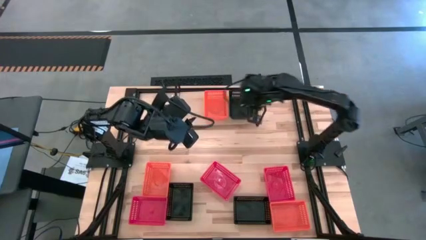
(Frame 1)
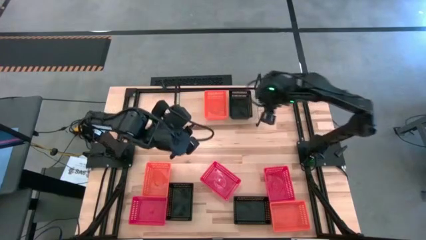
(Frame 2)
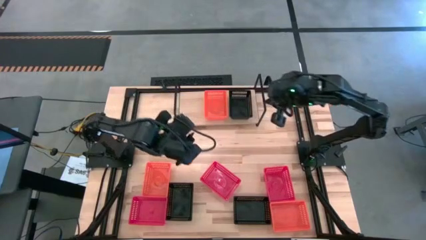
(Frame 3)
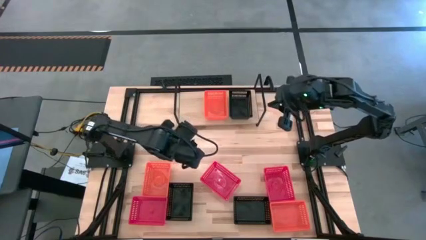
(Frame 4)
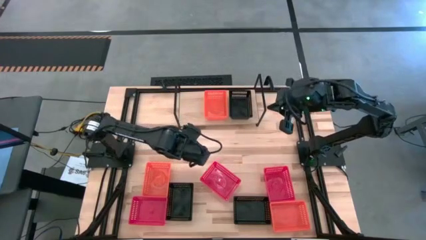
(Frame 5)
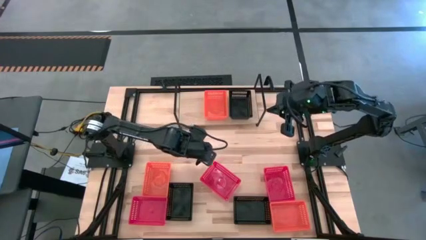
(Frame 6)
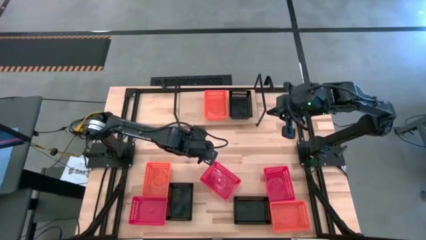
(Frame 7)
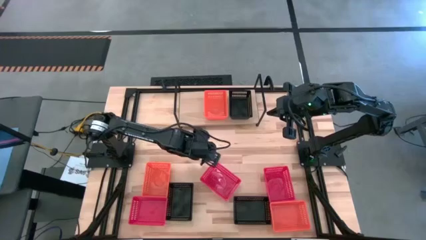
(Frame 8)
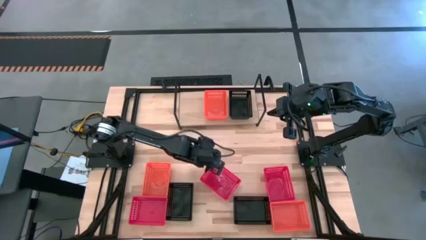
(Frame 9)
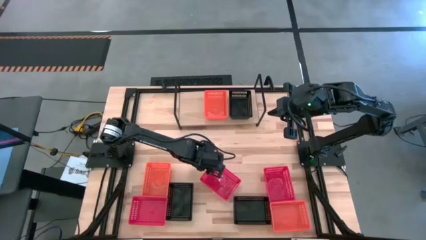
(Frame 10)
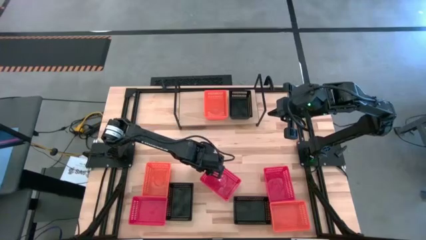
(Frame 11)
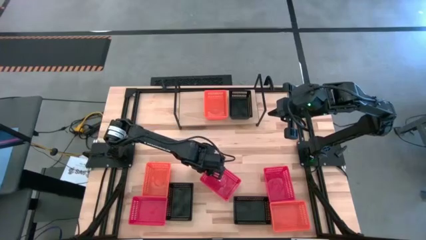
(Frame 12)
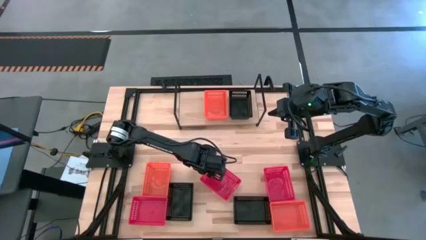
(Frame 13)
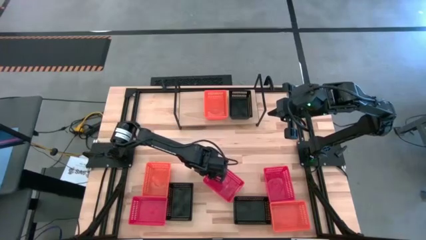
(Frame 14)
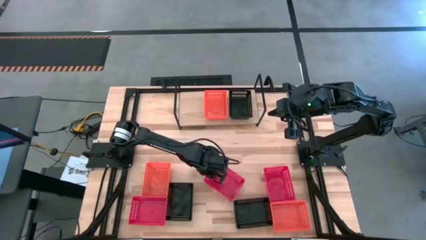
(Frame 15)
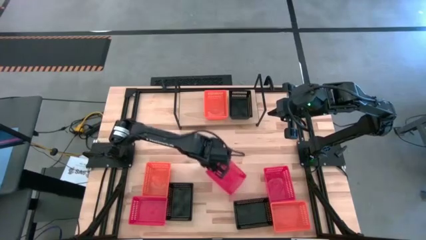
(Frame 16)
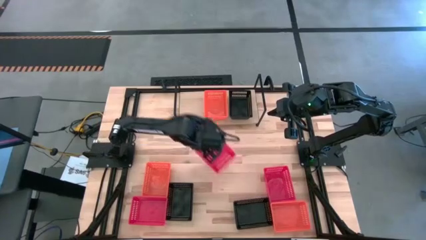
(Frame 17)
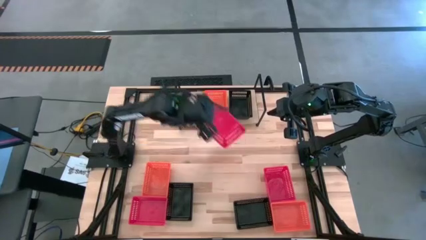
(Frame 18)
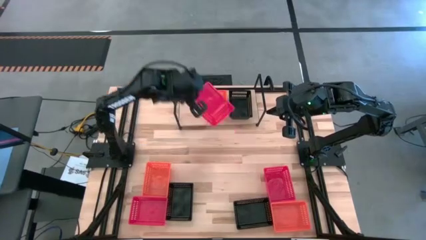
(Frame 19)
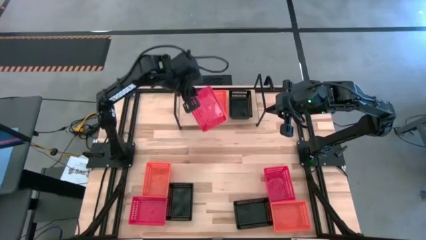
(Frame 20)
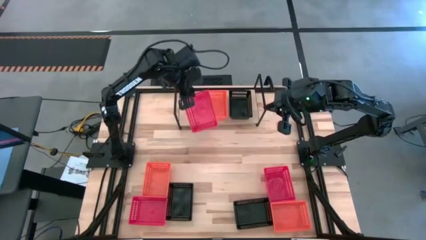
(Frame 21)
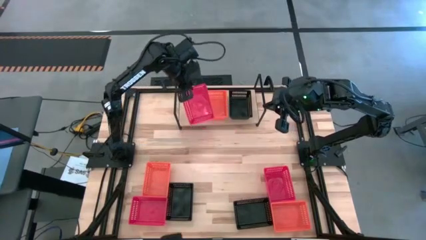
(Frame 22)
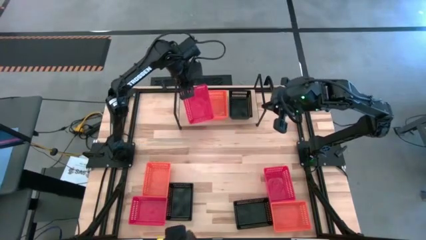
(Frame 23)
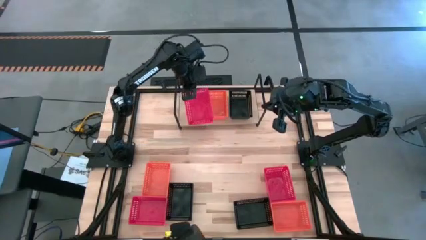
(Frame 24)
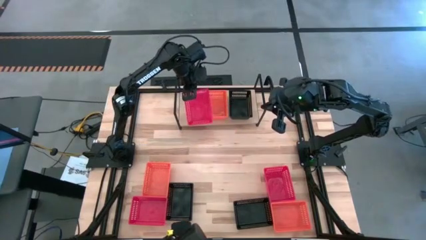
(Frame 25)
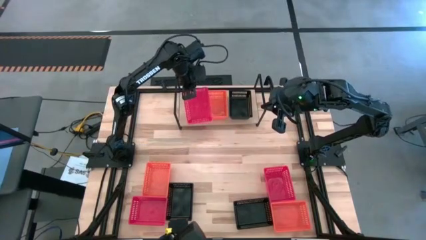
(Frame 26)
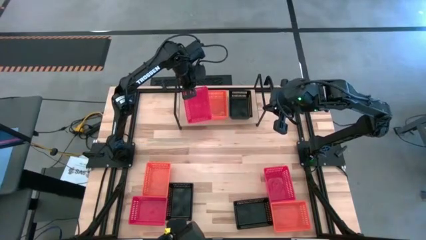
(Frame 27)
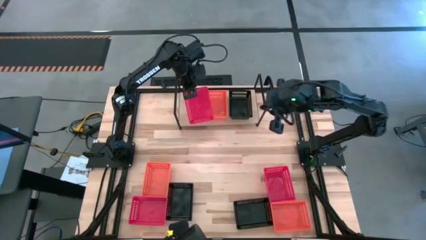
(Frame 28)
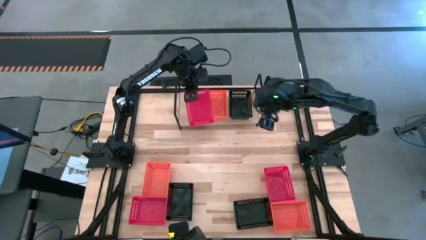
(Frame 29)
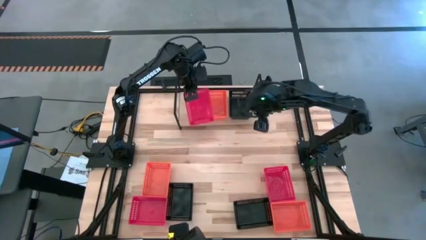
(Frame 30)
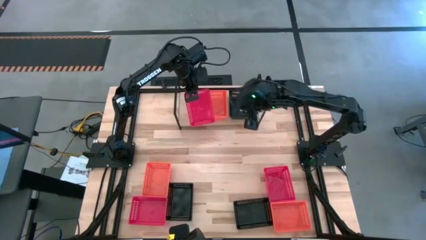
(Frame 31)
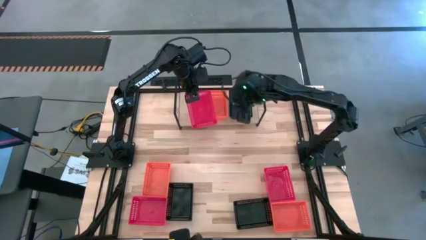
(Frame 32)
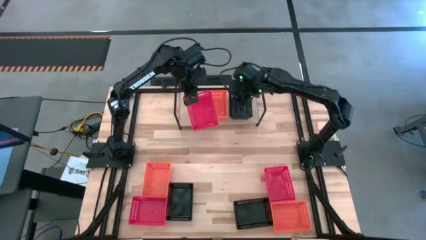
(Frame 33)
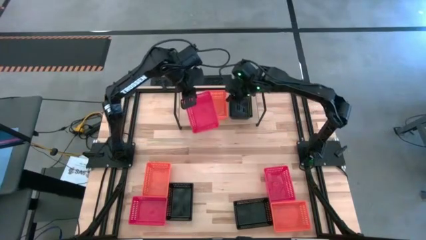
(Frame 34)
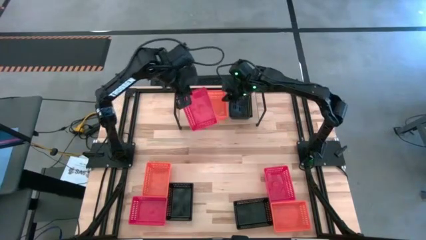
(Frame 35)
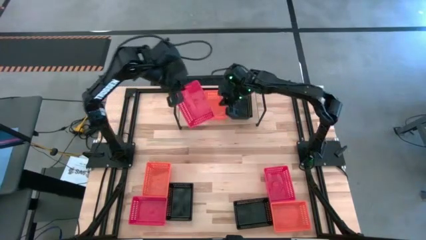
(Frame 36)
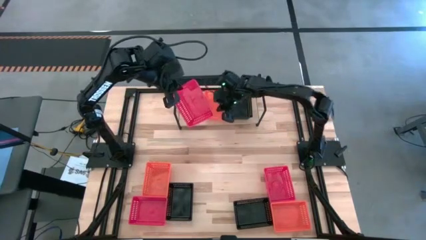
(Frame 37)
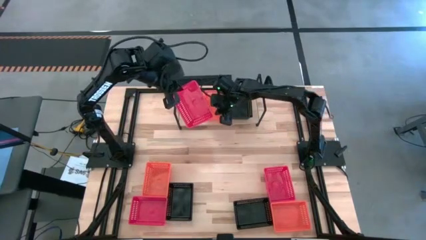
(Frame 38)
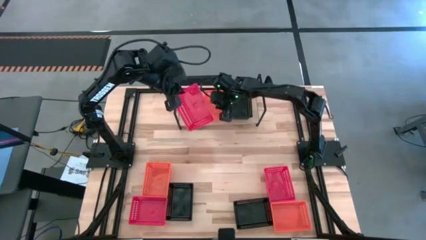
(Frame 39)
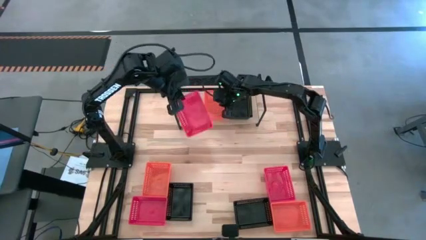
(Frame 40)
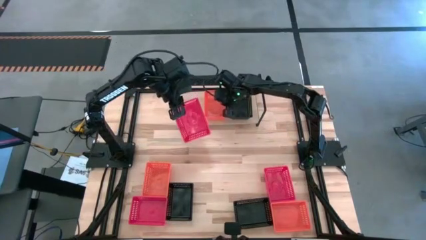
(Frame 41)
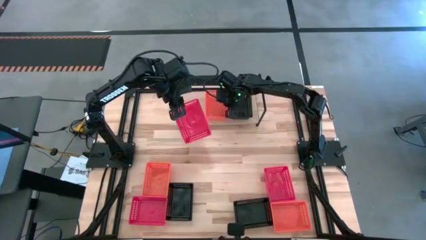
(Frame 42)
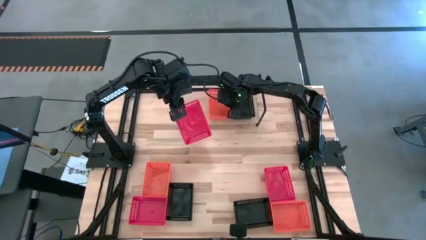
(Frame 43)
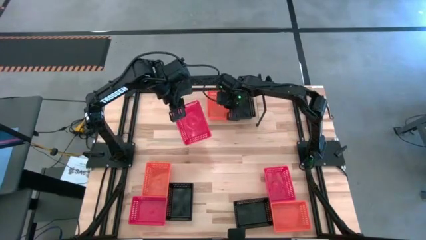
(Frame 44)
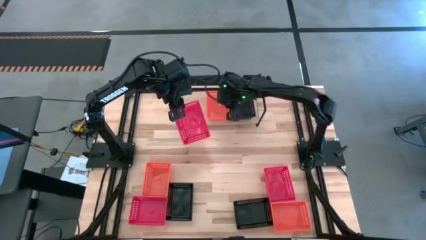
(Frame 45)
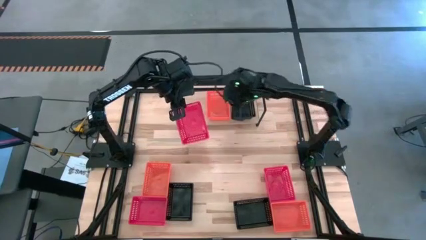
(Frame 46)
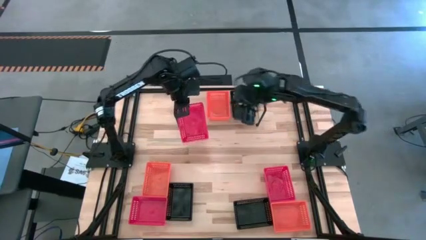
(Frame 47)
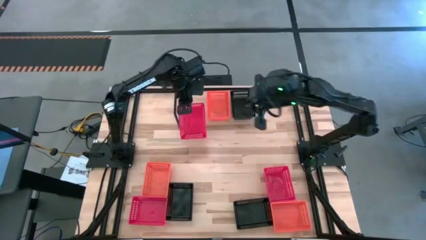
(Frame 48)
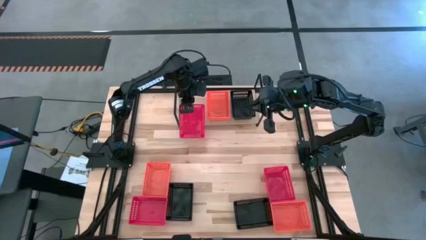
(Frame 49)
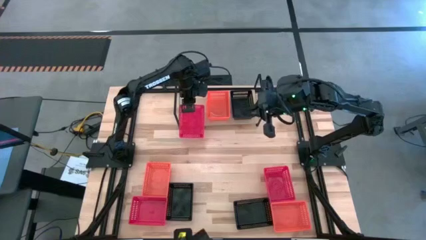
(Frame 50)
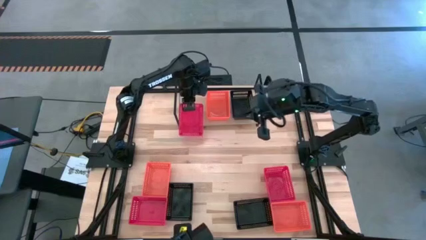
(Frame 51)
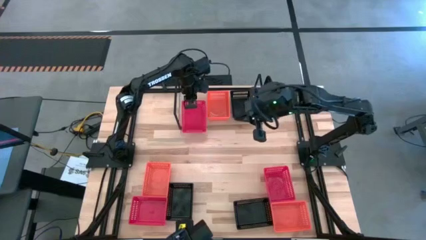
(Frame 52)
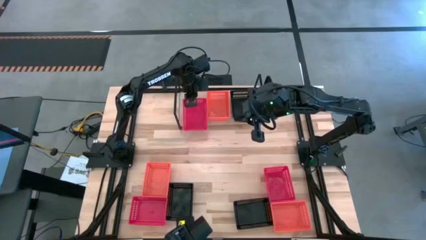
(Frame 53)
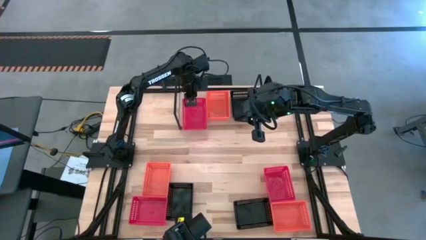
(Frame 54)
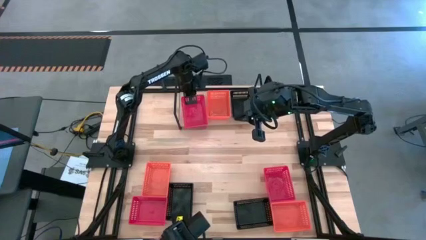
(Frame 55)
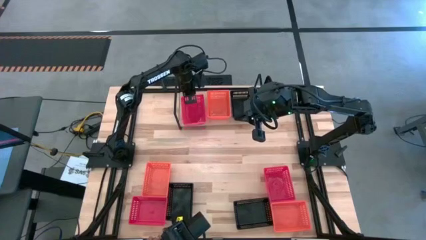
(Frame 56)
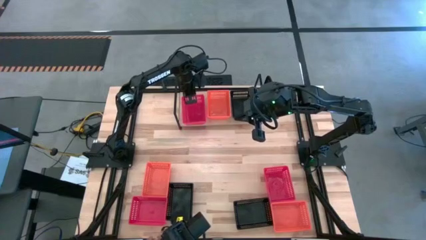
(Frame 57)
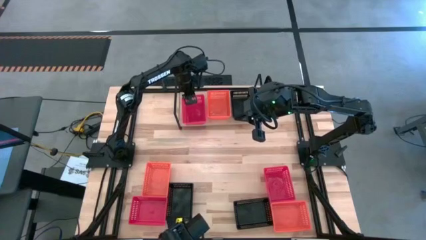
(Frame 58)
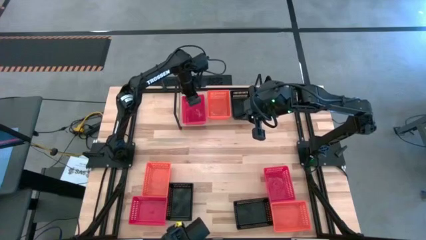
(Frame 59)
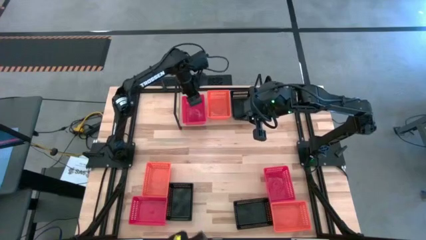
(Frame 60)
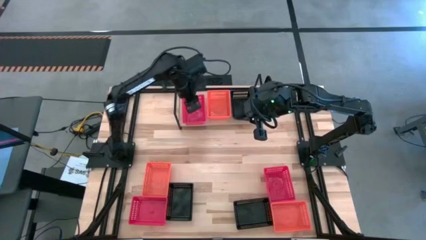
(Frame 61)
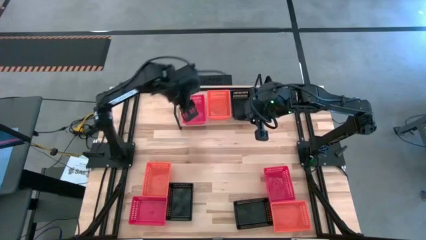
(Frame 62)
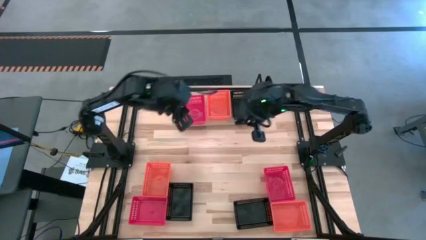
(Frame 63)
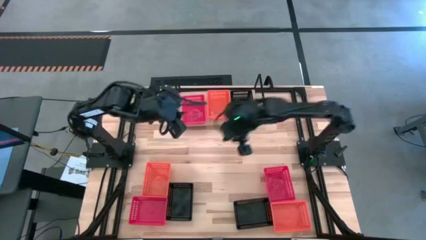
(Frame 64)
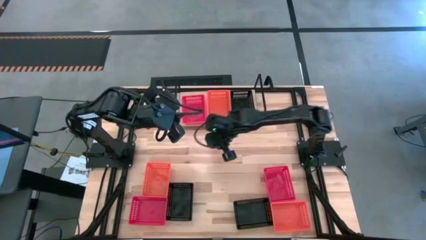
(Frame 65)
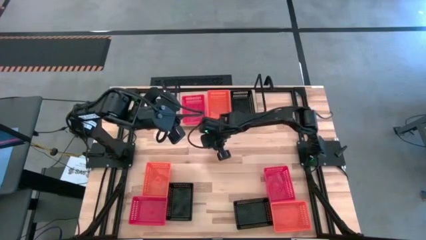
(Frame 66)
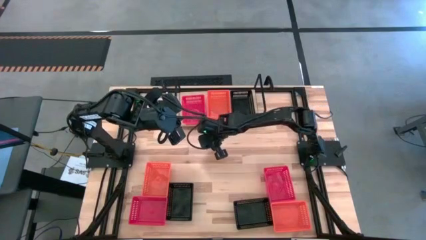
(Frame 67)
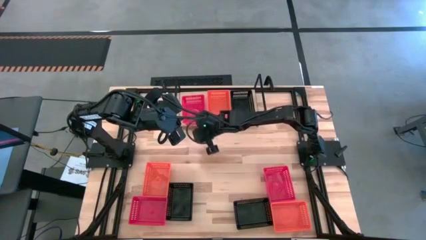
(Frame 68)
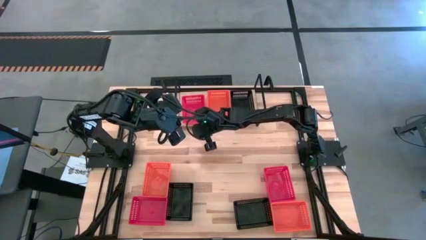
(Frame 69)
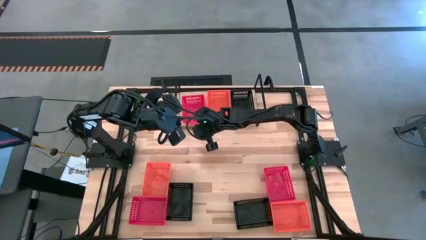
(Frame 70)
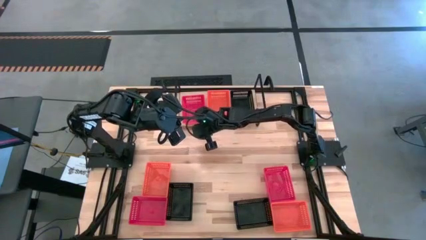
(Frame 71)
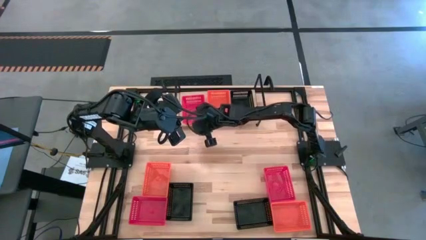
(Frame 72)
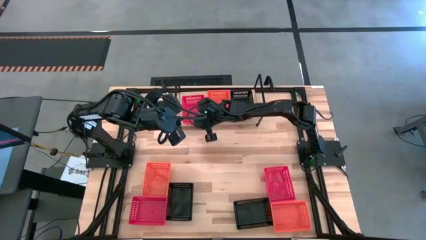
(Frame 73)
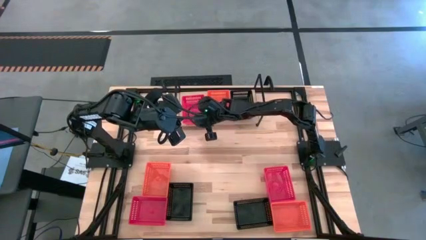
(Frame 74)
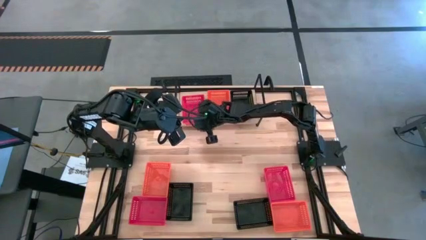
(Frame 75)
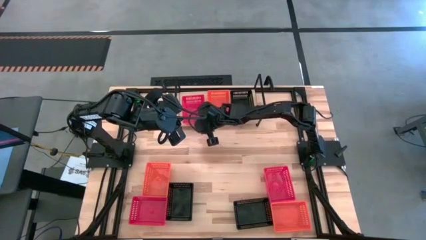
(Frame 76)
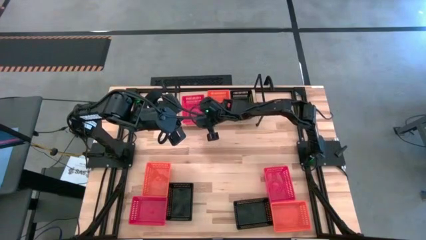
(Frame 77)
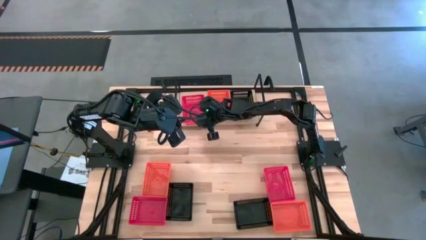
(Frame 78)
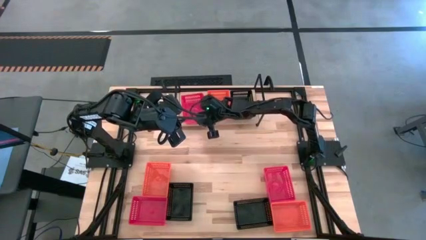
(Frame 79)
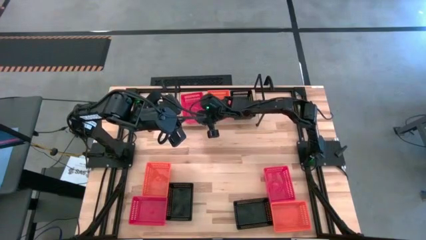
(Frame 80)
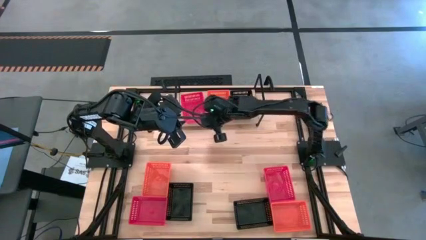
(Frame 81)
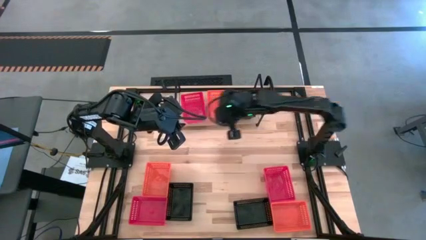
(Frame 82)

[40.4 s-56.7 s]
Task: Stack baskets on shelf by color
Put the center red bin on the shelf
